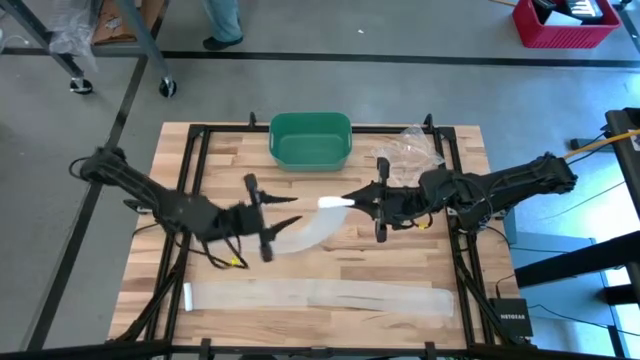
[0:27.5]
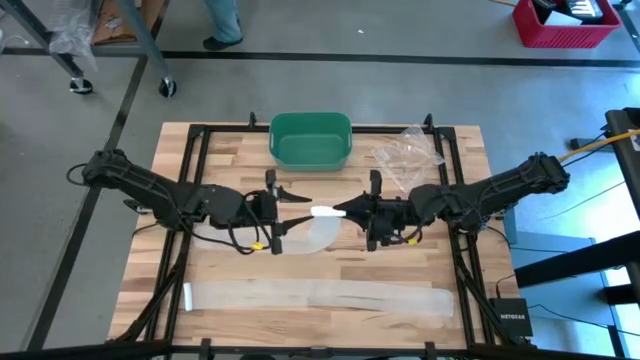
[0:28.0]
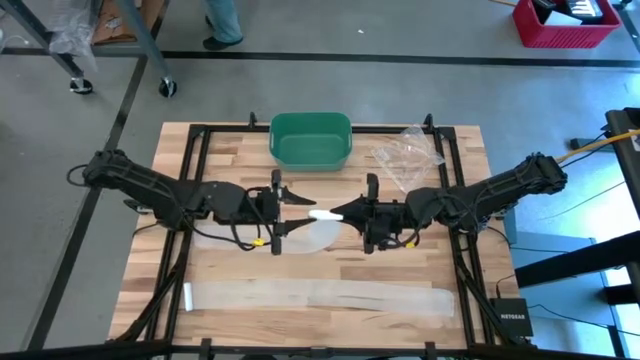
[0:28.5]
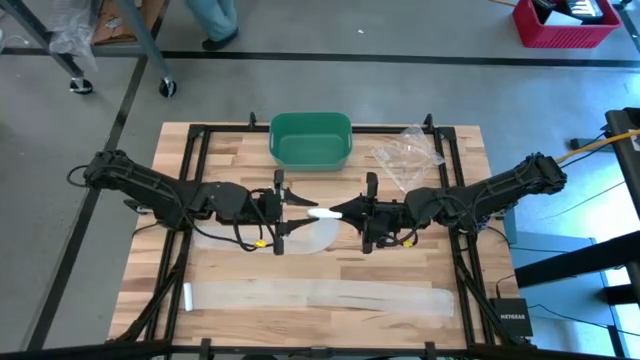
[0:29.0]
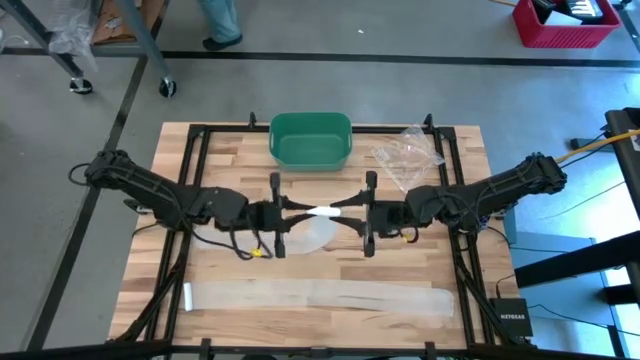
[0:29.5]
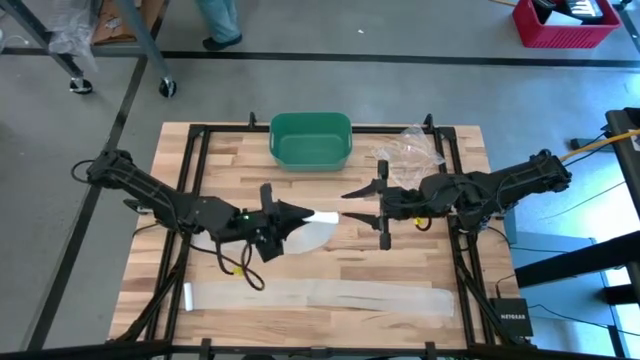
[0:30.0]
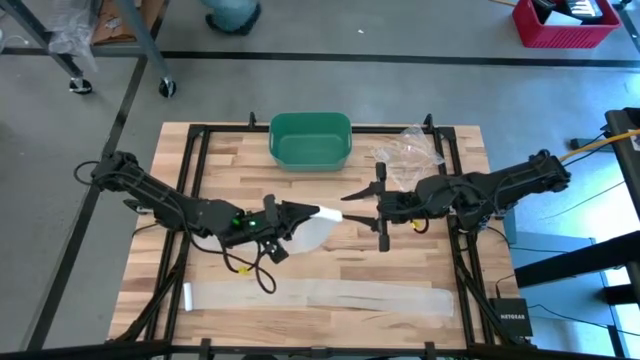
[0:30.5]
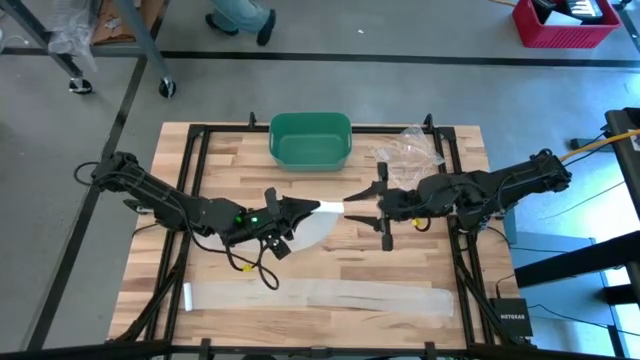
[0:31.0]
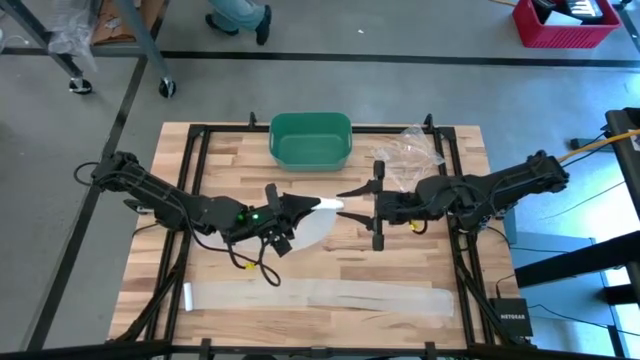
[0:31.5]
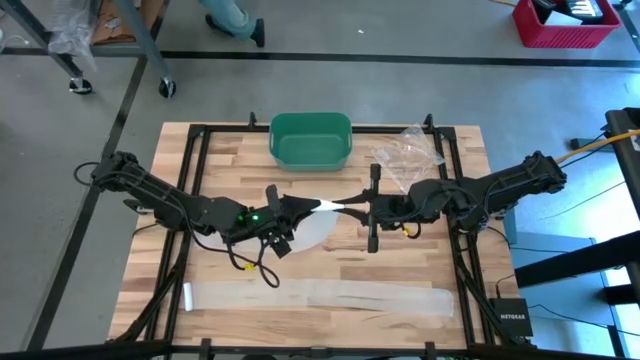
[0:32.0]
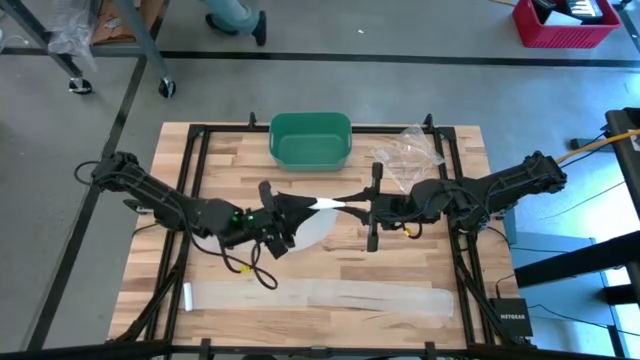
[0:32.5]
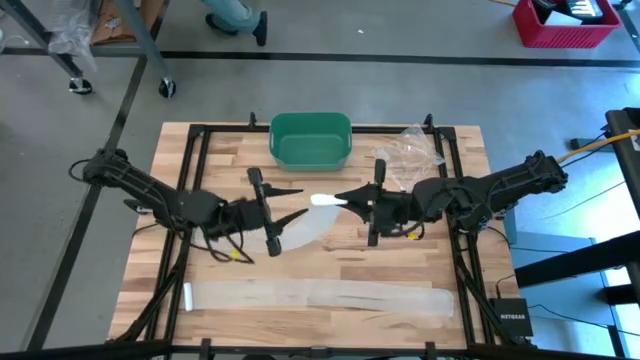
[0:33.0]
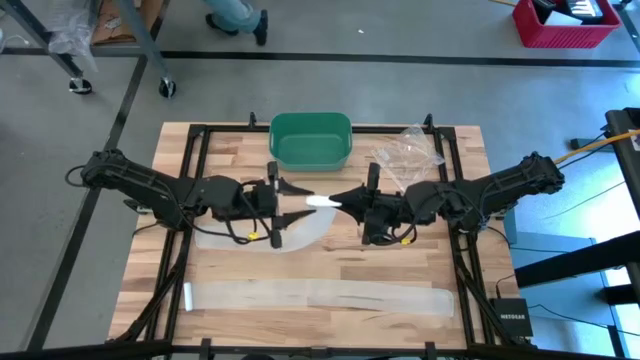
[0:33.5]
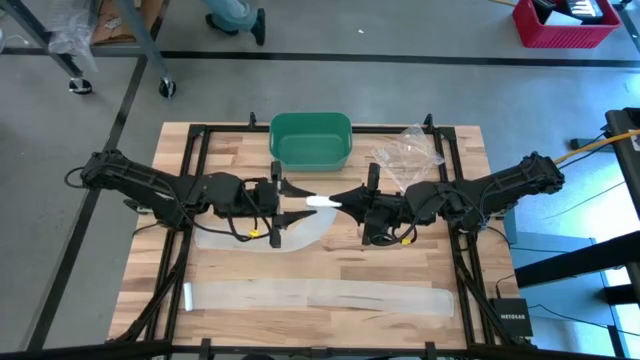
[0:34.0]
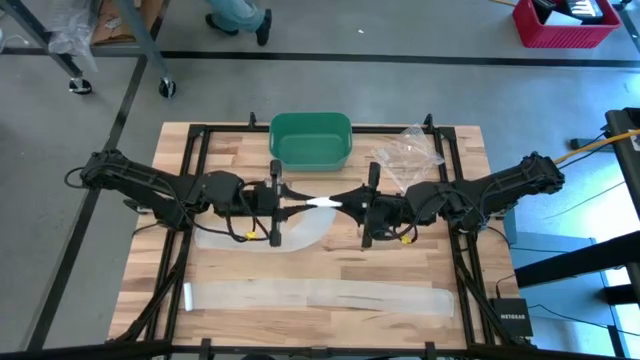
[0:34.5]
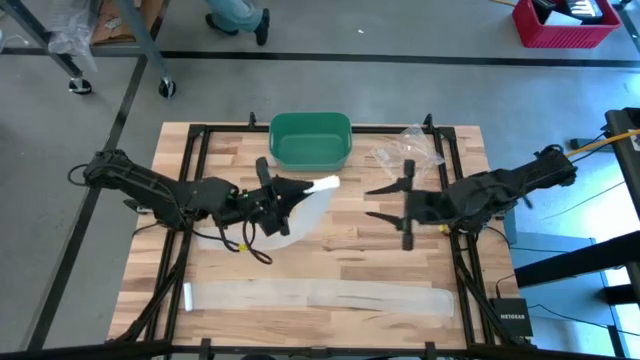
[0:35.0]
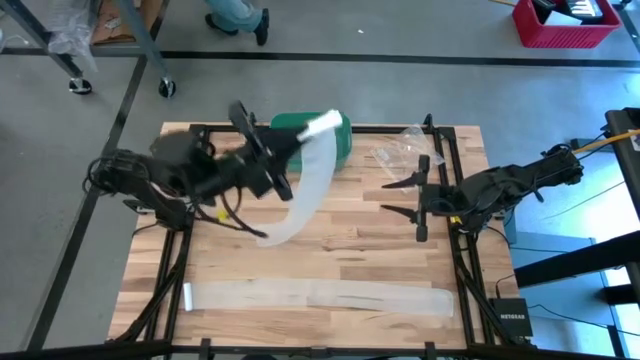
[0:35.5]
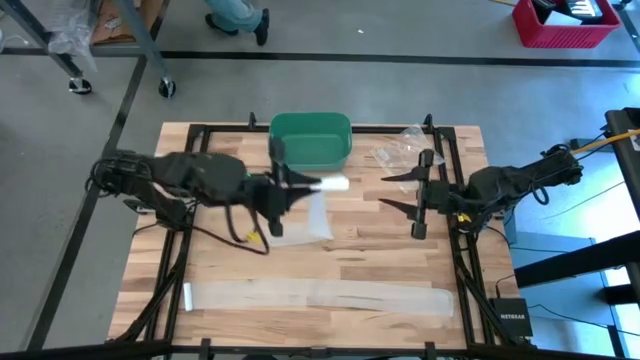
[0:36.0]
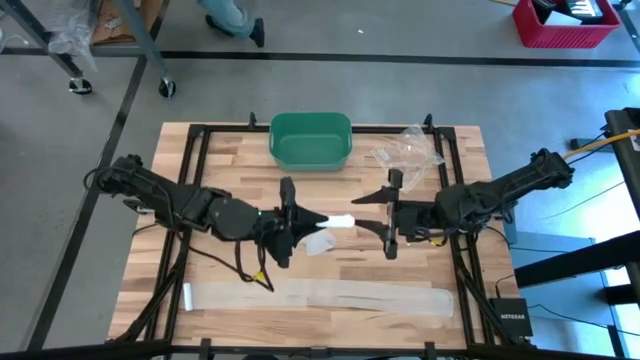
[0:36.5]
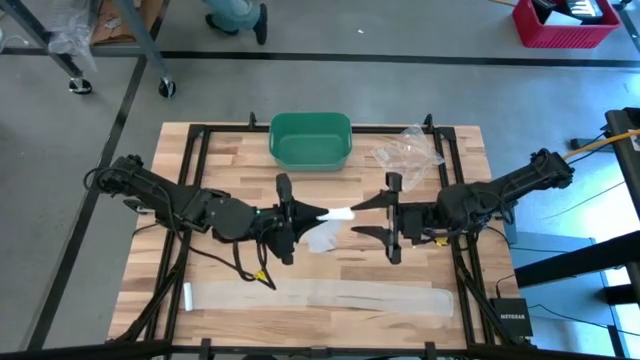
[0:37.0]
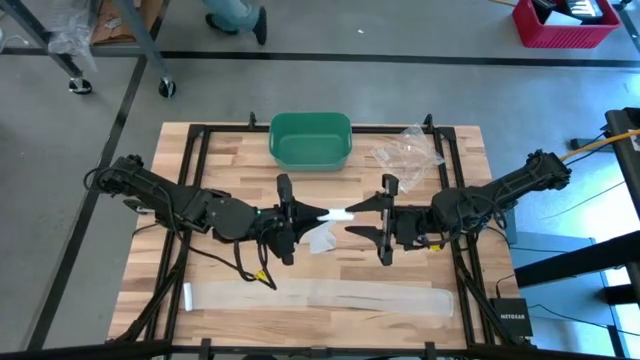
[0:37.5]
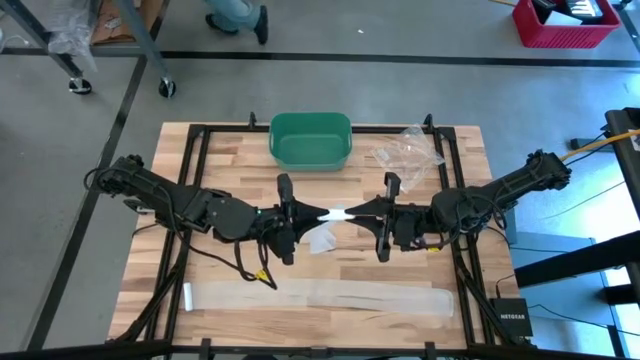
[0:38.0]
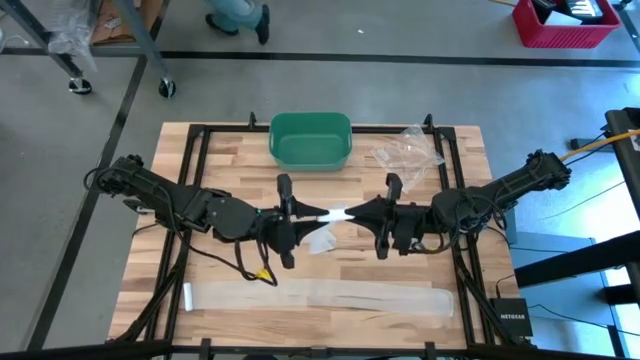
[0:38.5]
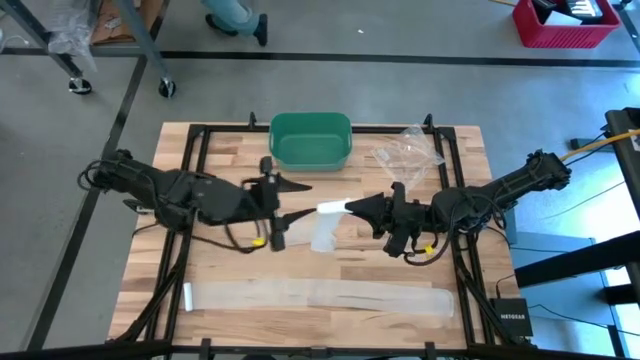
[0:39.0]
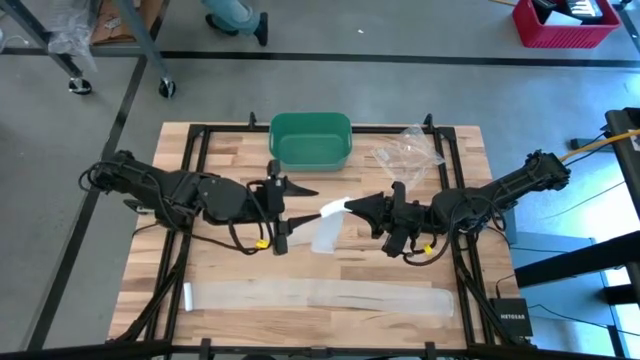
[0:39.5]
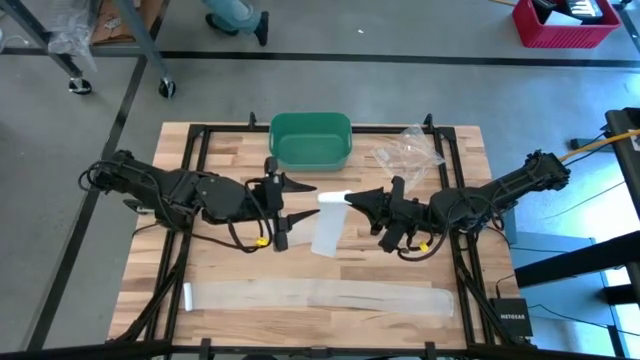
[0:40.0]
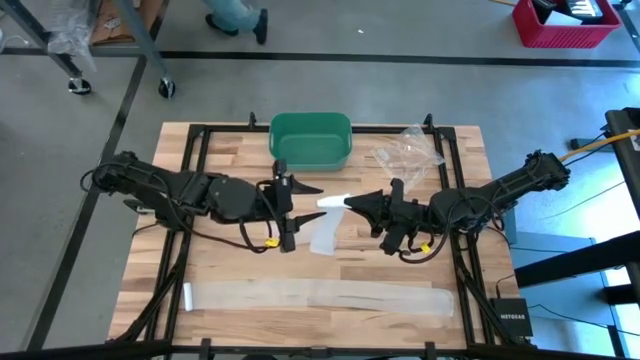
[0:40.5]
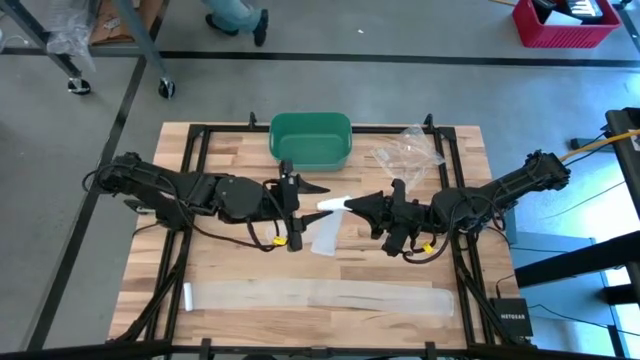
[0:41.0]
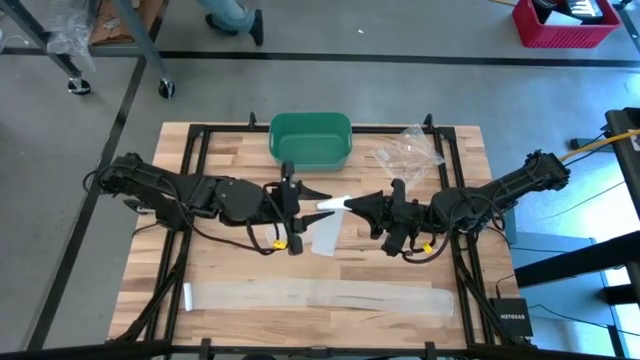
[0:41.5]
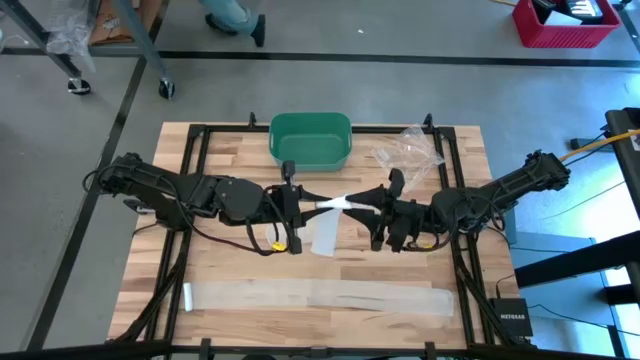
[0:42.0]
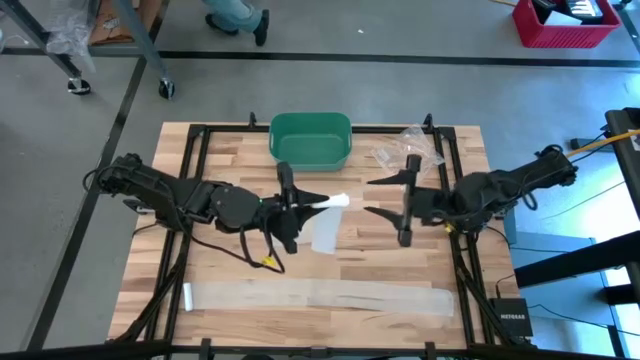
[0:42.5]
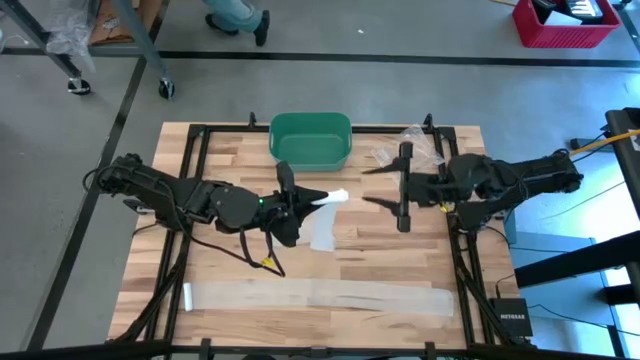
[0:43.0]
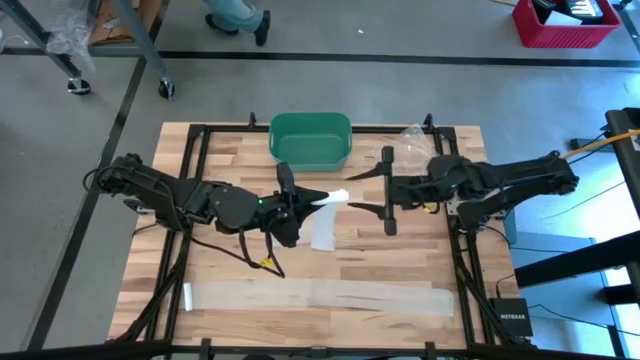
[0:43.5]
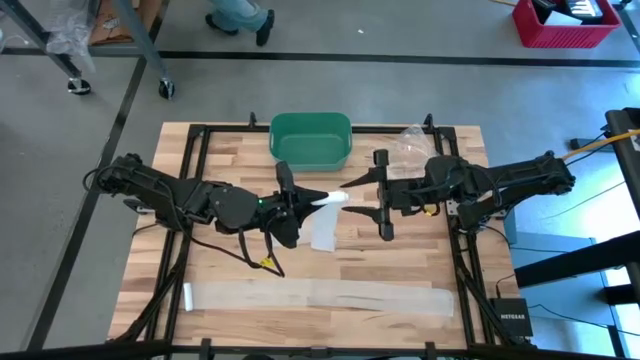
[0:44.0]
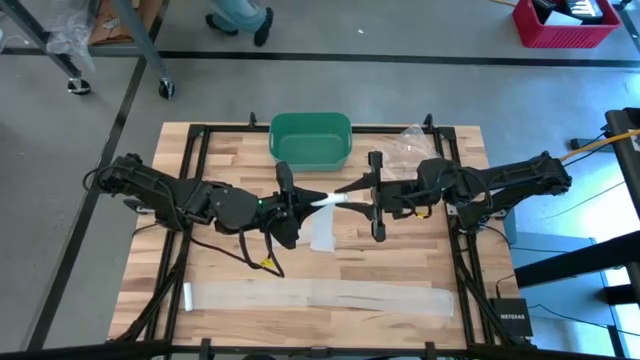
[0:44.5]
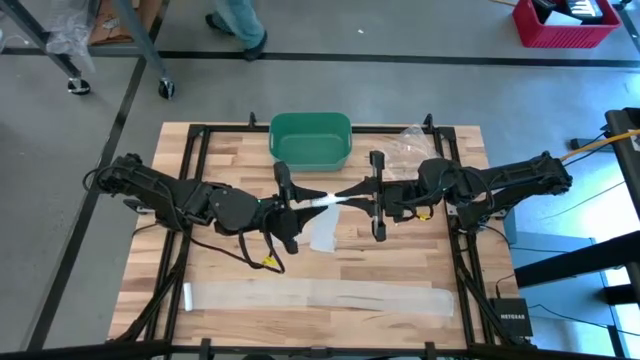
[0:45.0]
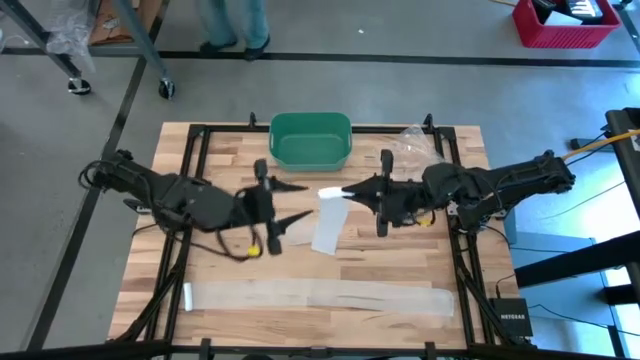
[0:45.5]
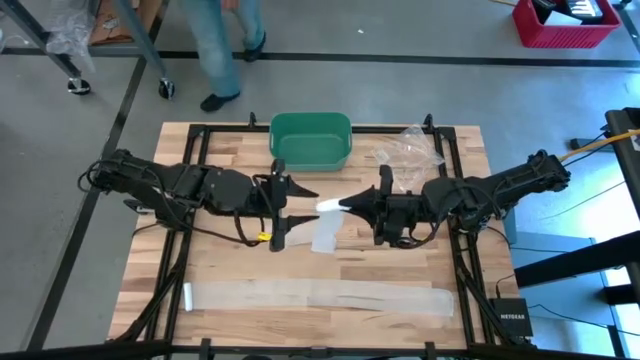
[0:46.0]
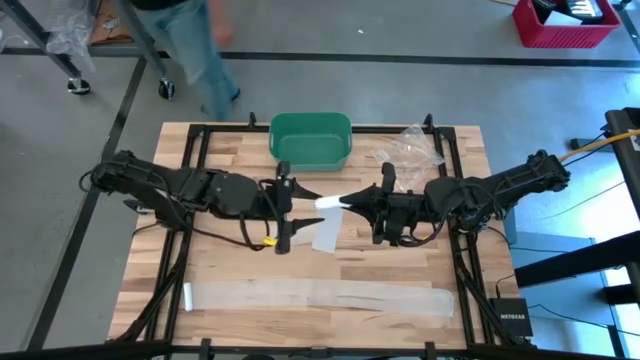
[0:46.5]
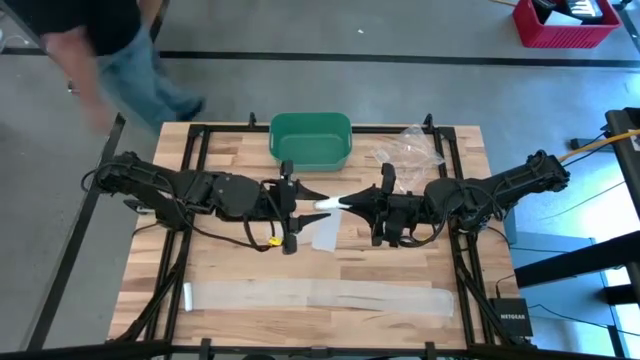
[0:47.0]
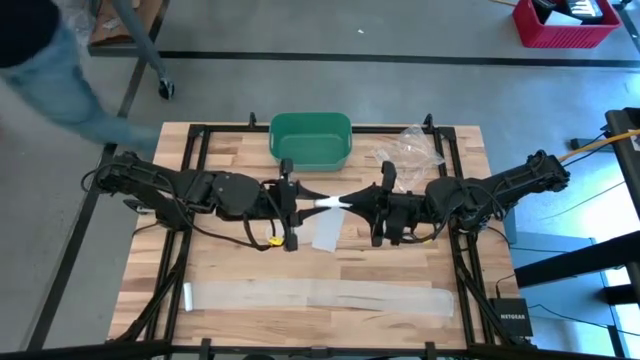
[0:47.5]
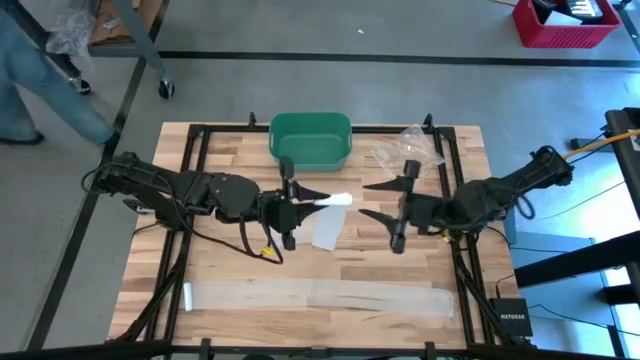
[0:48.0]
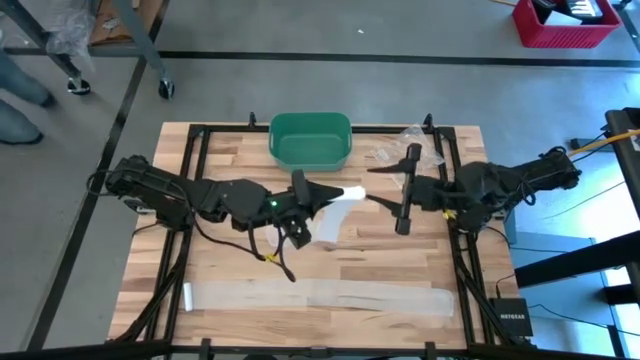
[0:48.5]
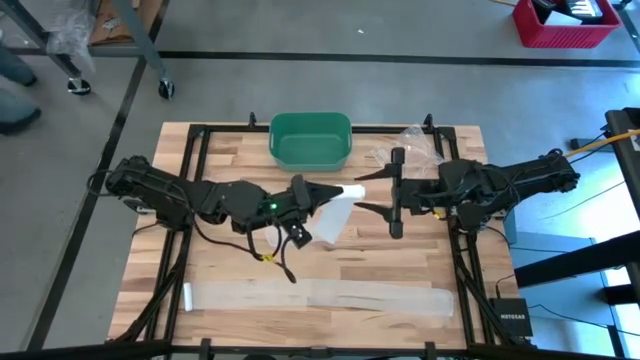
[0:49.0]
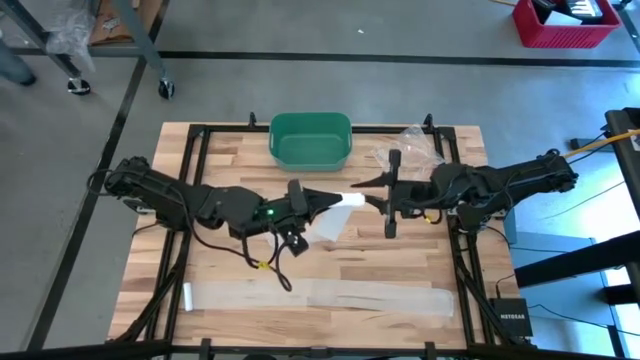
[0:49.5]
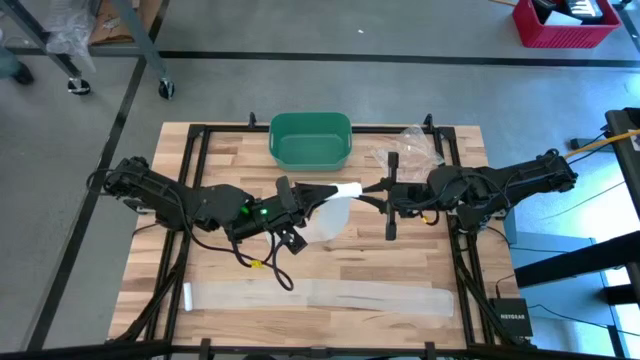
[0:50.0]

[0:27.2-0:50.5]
Task: Roll bandage
Roll the top white bandage
